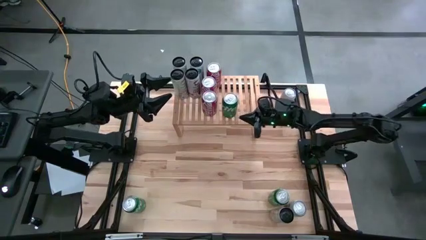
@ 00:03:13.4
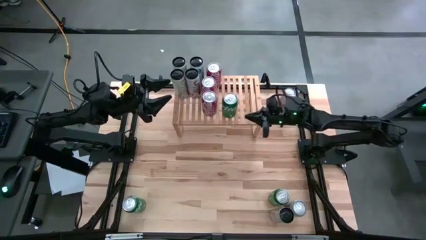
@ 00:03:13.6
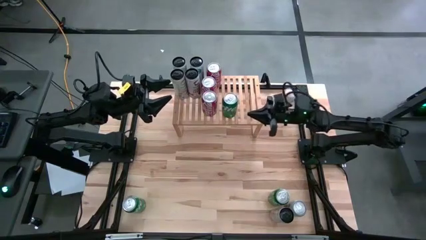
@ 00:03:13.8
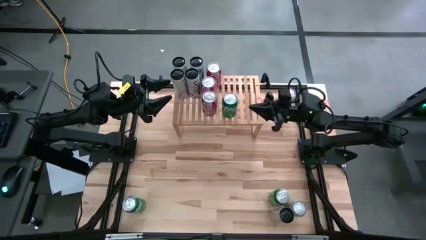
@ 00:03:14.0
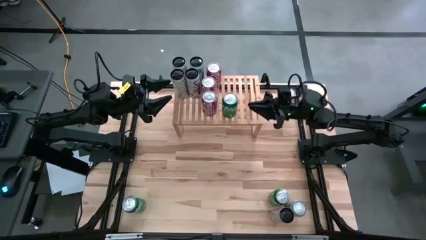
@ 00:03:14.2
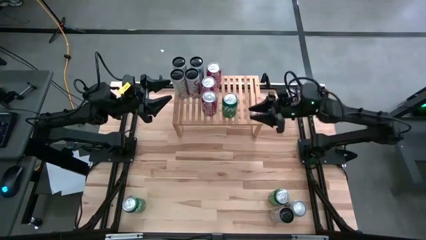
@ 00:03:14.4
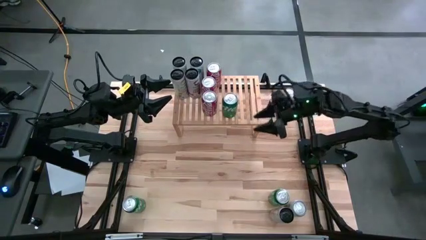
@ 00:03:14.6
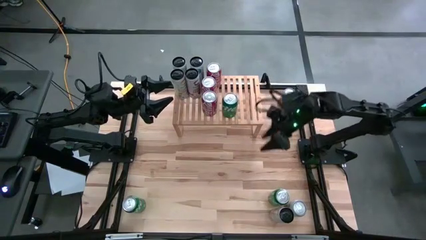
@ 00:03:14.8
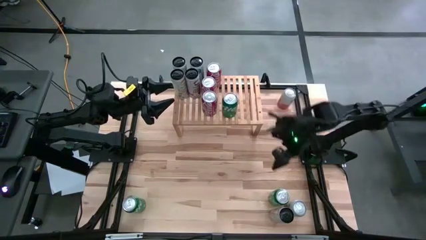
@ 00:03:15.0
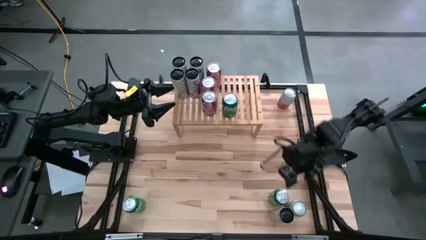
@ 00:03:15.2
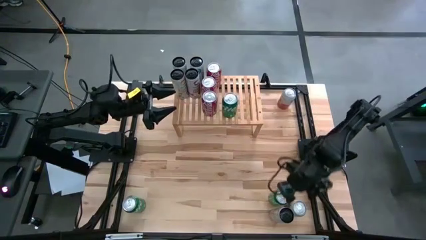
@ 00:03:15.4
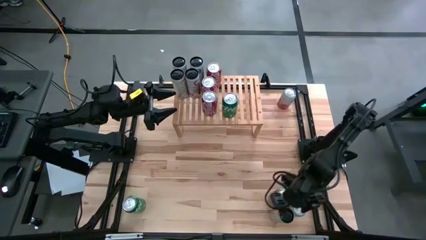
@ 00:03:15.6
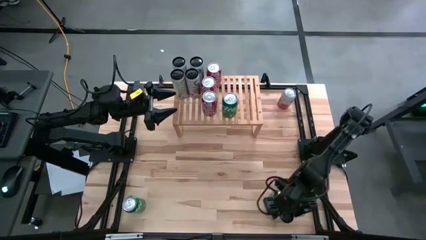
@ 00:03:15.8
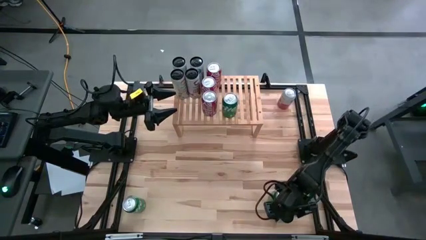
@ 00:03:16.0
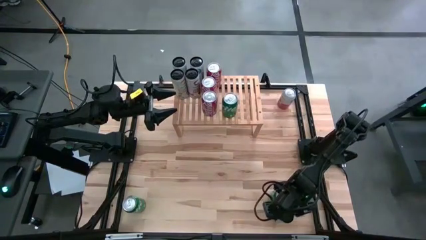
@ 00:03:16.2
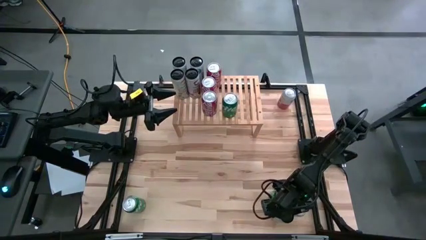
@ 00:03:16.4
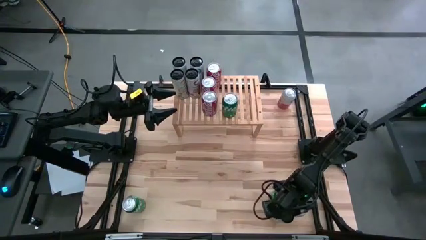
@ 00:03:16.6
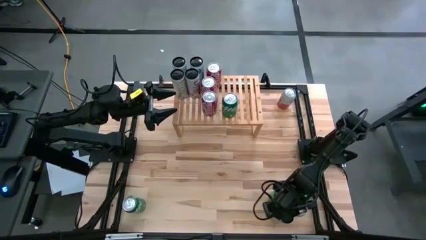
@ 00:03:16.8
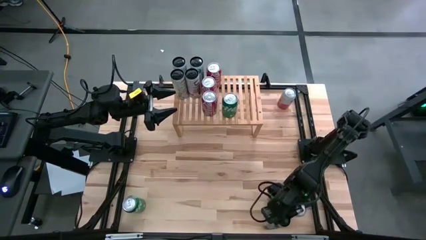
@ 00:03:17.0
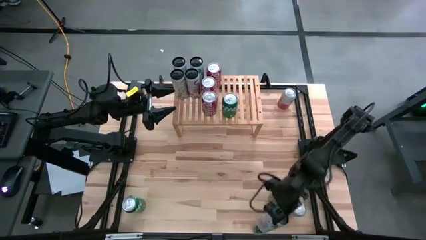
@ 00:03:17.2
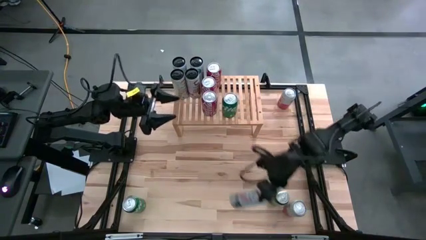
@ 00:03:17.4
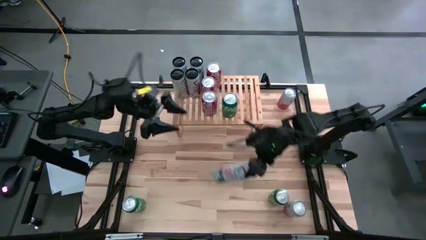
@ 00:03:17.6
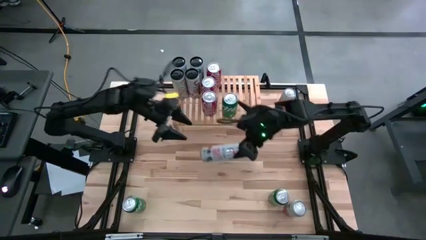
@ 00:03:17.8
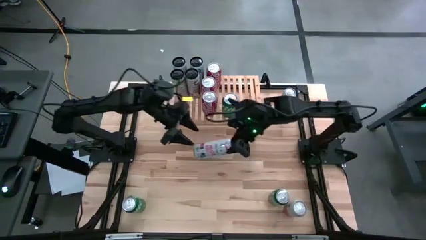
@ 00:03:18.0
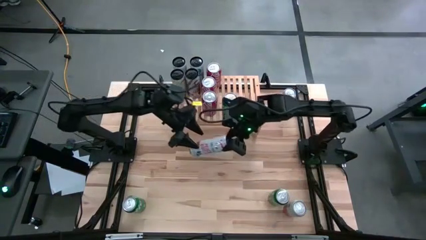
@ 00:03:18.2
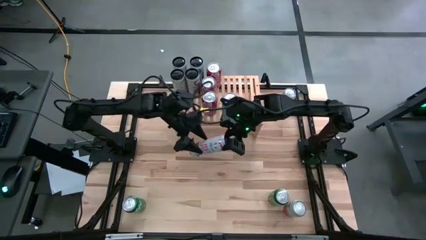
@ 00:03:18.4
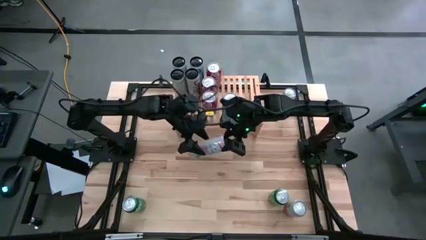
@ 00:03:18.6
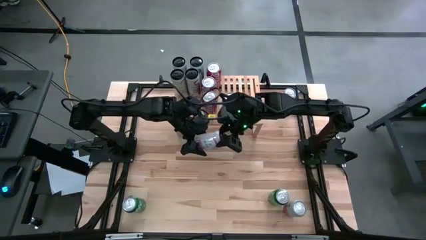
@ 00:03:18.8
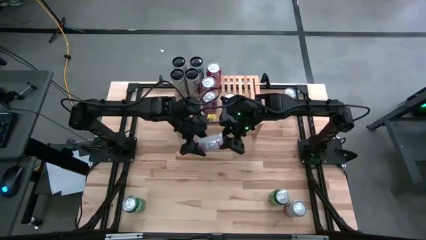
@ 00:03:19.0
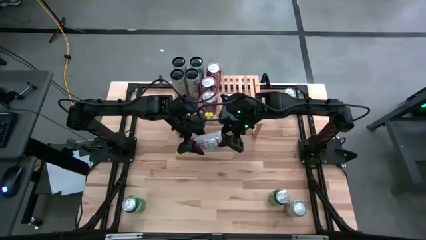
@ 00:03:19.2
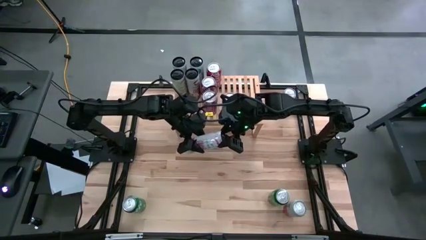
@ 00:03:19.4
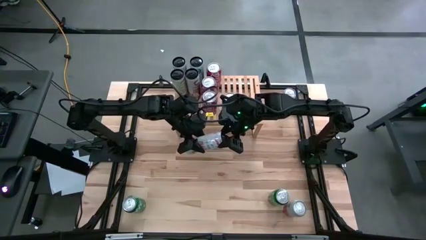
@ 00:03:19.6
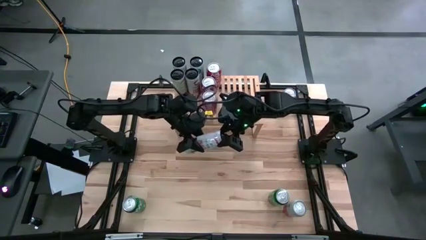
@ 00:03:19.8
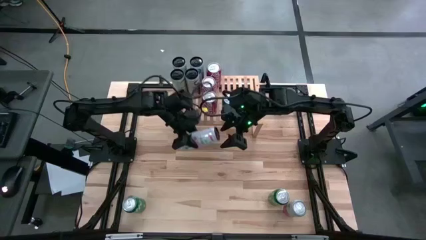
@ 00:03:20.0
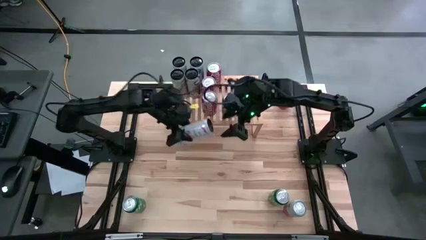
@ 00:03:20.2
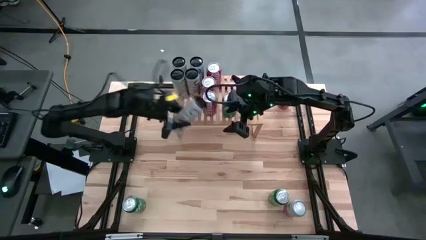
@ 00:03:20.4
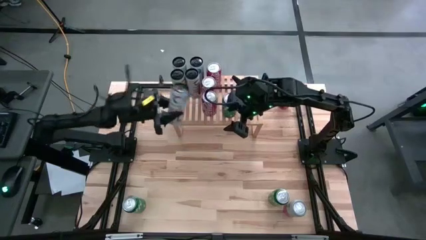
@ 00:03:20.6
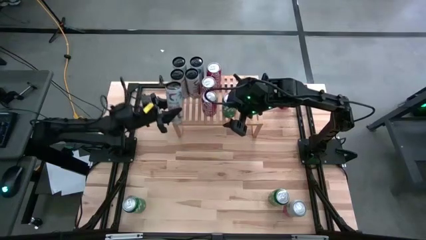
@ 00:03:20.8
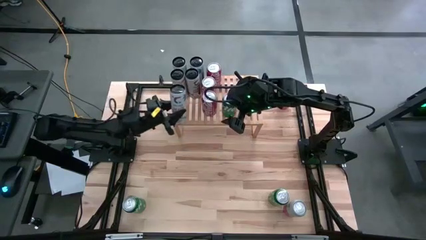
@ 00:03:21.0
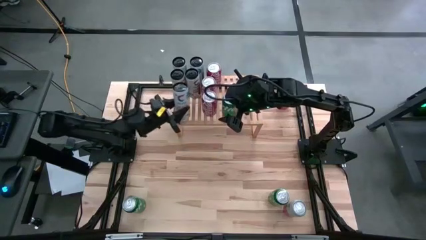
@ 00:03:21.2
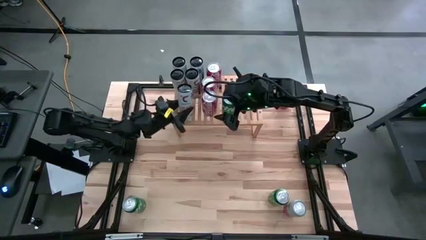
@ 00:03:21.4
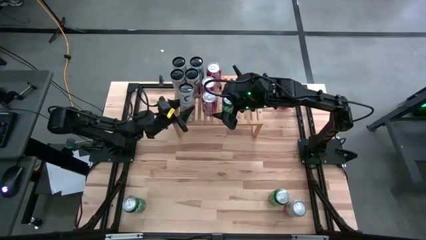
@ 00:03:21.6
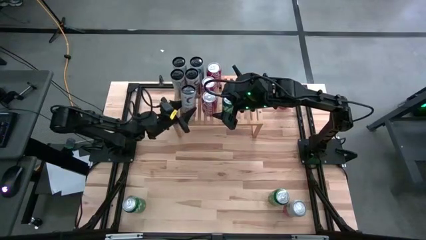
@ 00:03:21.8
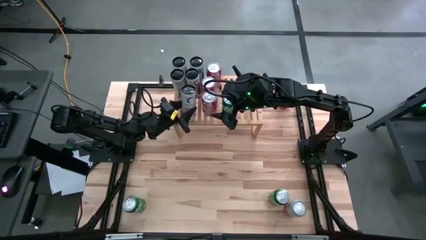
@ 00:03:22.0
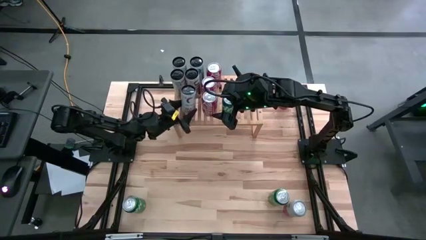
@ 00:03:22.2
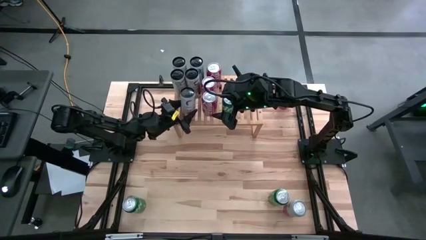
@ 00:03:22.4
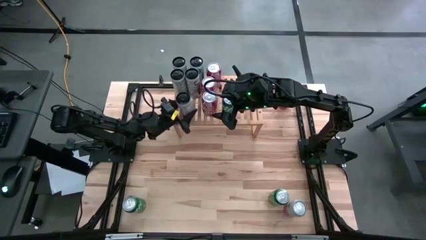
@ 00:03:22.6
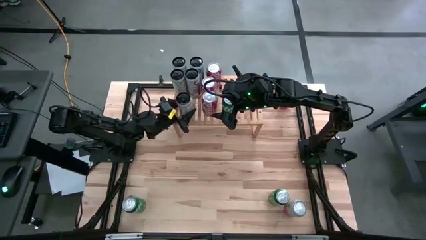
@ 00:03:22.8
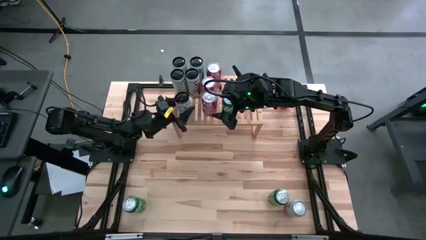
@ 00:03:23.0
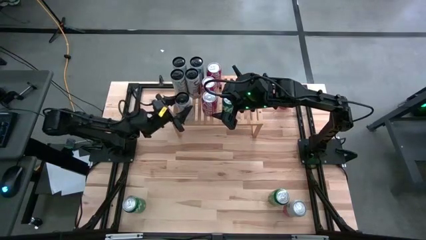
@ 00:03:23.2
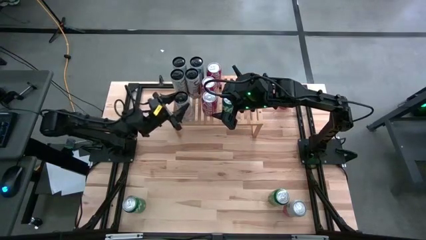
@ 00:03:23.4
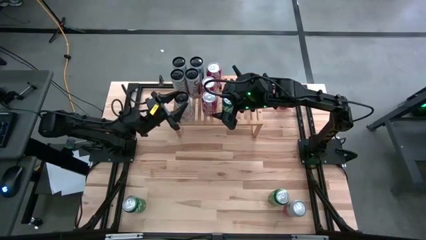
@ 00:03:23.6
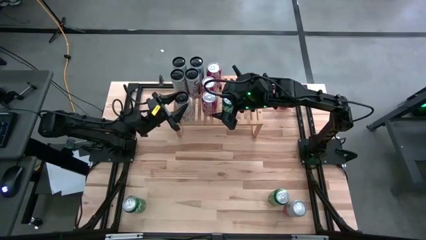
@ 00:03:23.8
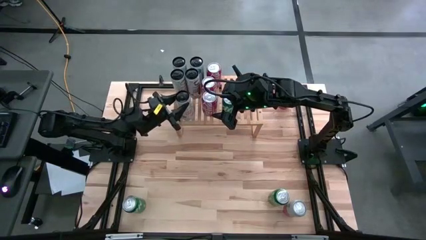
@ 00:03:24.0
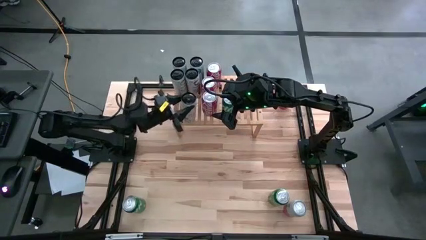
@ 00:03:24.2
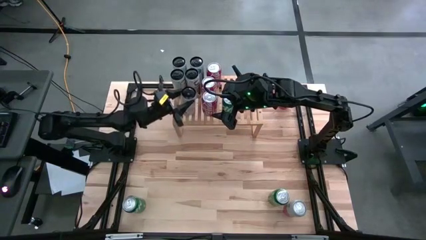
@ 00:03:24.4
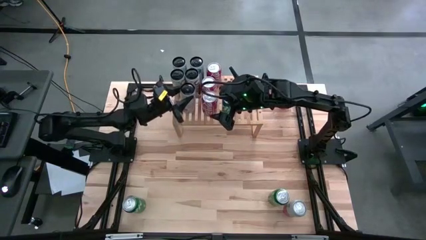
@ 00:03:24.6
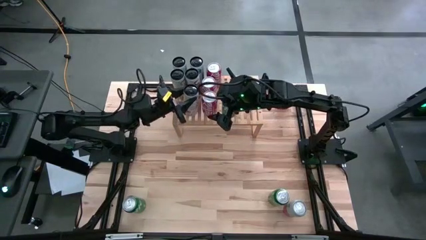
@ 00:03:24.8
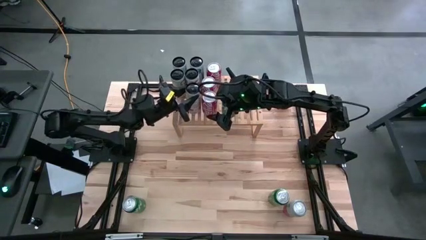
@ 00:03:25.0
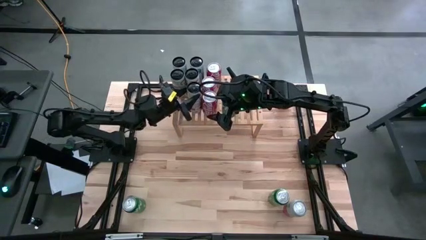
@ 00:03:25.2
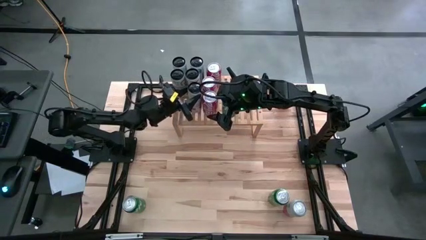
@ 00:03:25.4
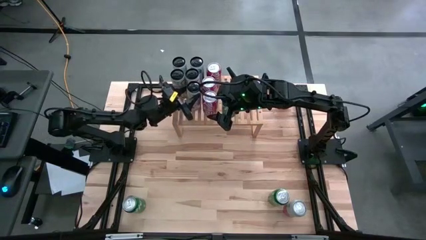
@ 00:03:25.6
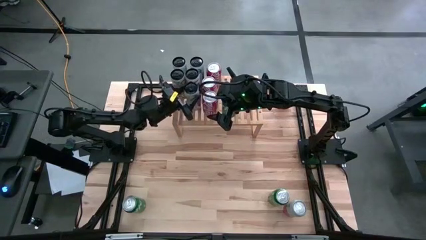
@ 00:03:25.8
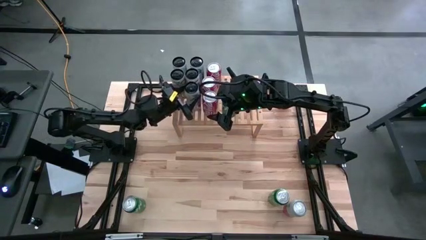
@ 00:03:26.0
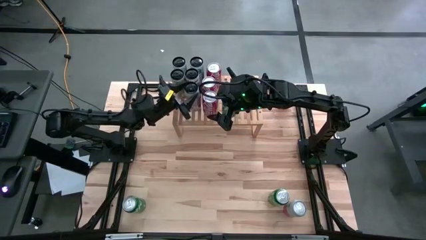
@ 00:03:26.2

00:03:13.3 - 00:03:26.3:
Task: Place canned beverage on shelf
Put the white pink soda can on the shelf aligned with other white pink soda can
